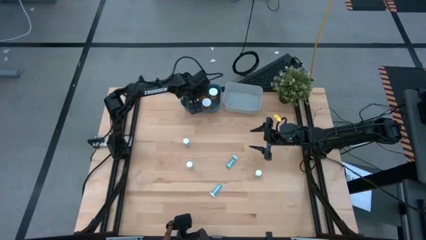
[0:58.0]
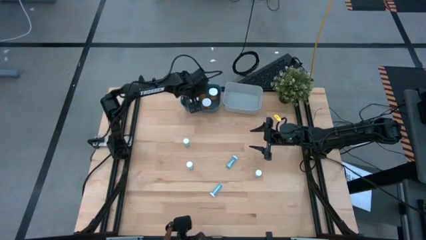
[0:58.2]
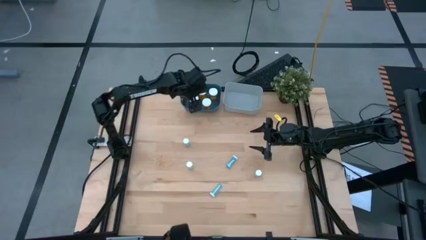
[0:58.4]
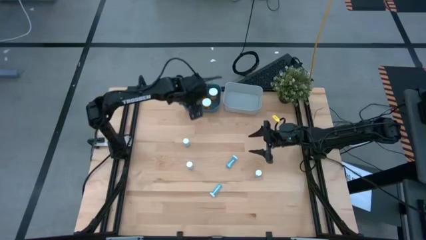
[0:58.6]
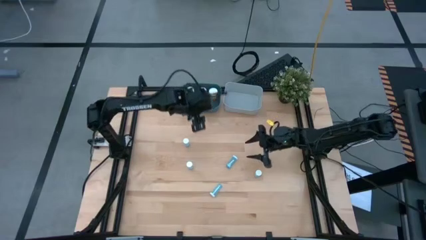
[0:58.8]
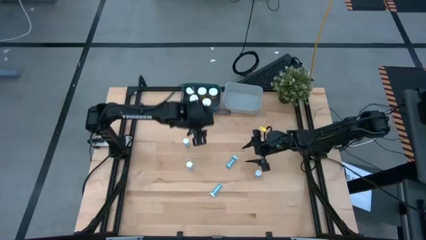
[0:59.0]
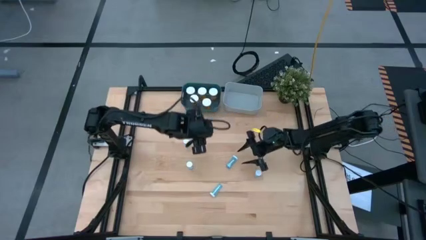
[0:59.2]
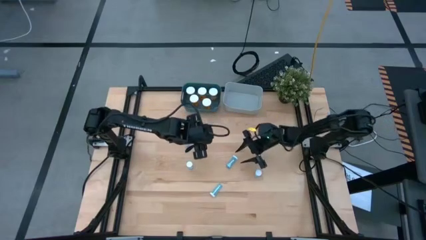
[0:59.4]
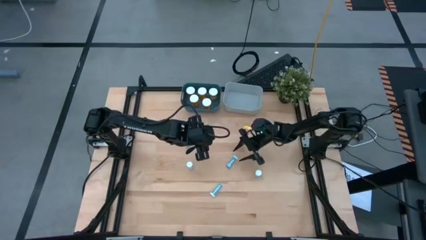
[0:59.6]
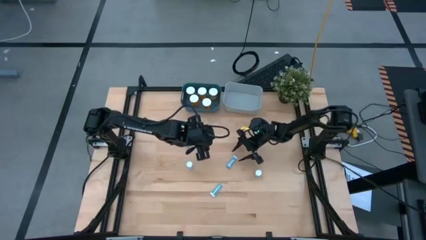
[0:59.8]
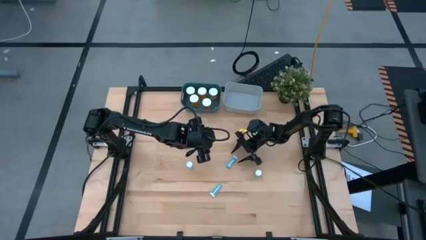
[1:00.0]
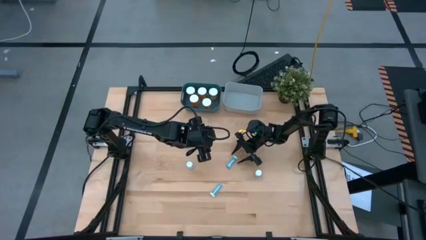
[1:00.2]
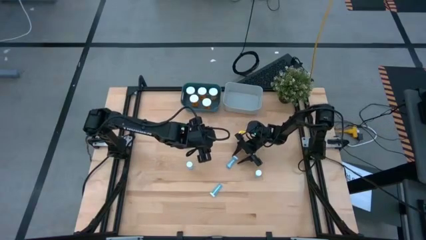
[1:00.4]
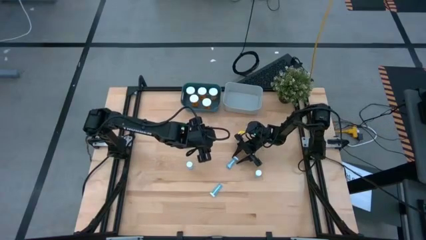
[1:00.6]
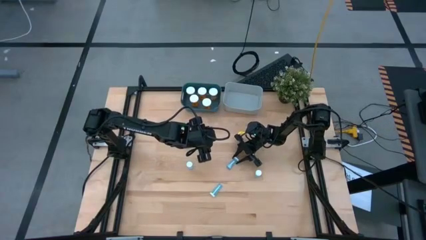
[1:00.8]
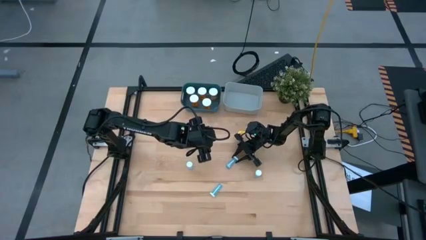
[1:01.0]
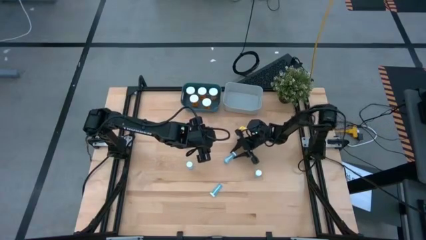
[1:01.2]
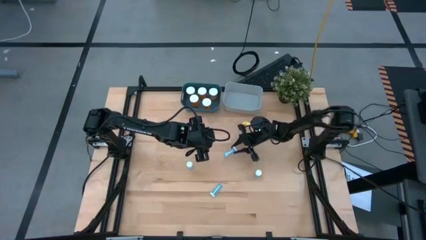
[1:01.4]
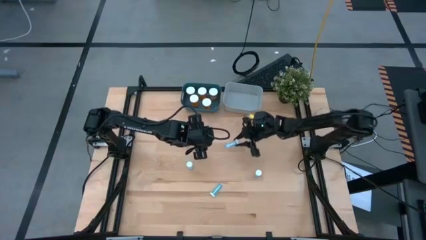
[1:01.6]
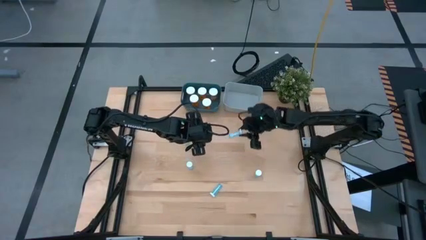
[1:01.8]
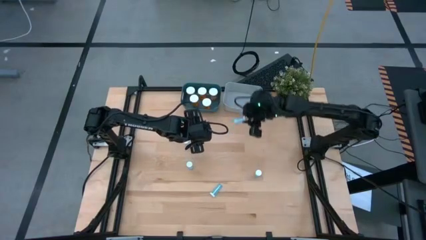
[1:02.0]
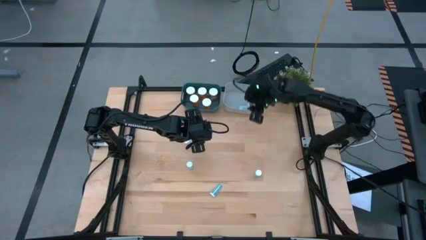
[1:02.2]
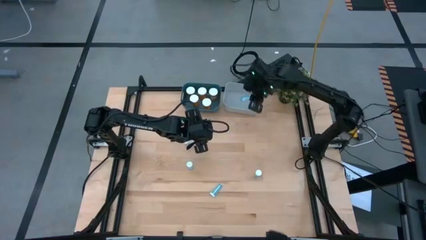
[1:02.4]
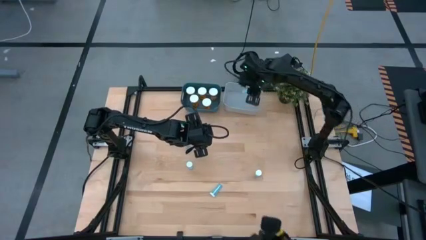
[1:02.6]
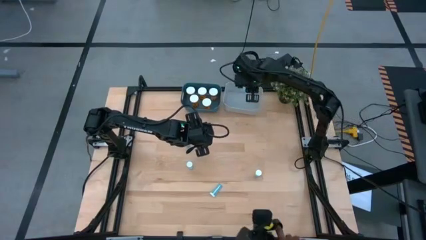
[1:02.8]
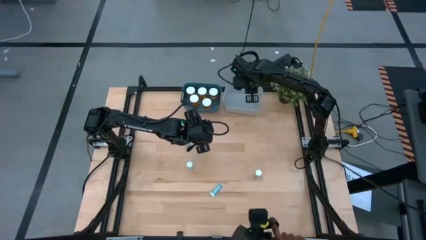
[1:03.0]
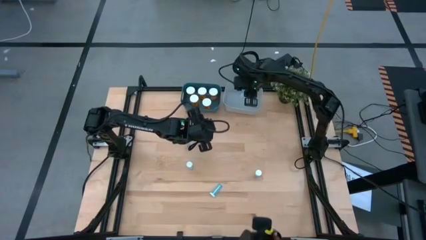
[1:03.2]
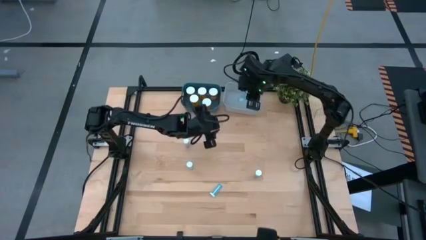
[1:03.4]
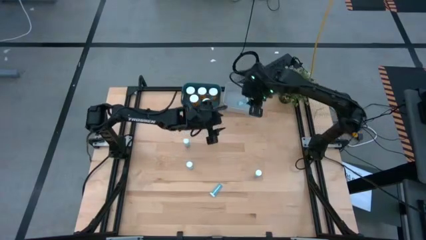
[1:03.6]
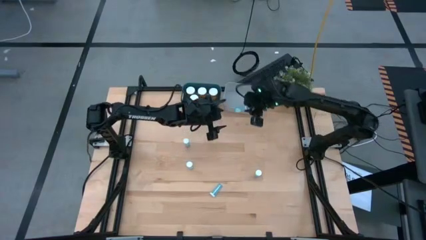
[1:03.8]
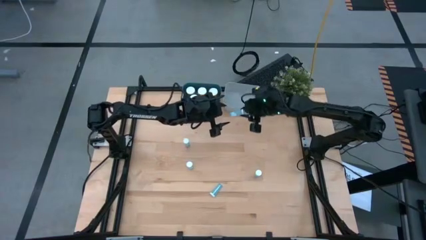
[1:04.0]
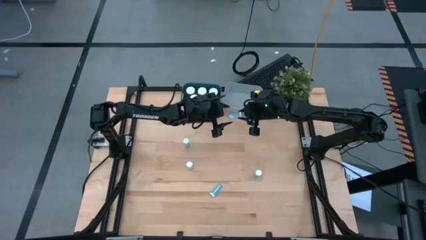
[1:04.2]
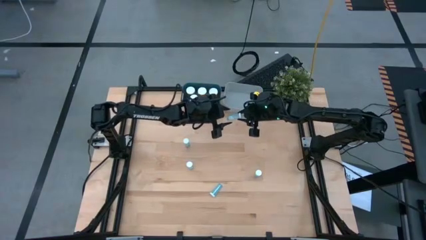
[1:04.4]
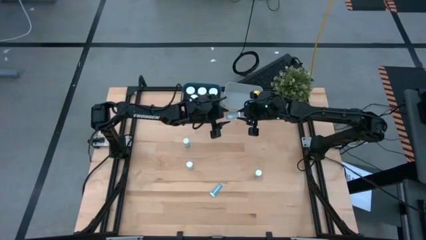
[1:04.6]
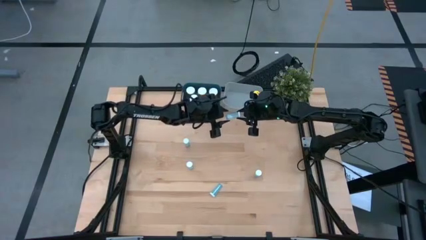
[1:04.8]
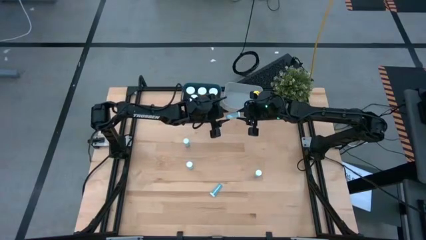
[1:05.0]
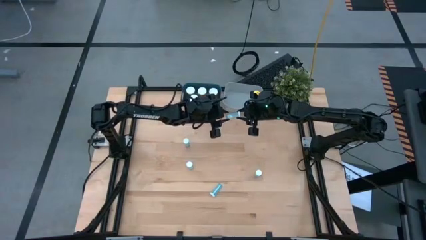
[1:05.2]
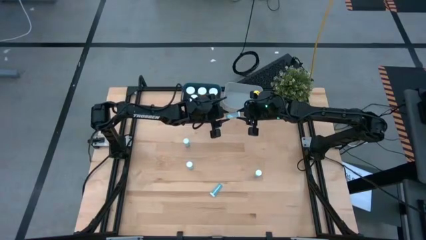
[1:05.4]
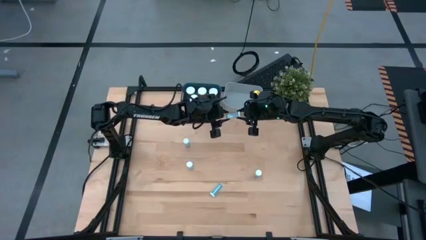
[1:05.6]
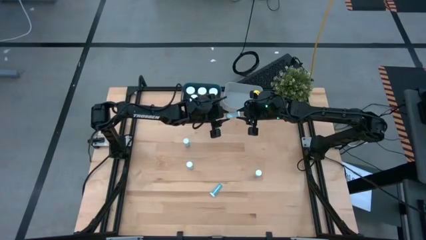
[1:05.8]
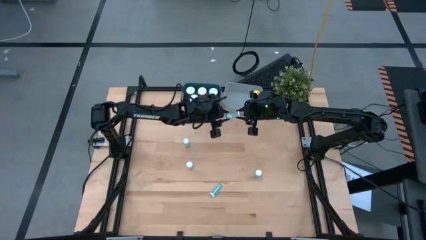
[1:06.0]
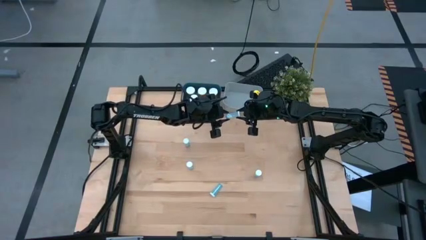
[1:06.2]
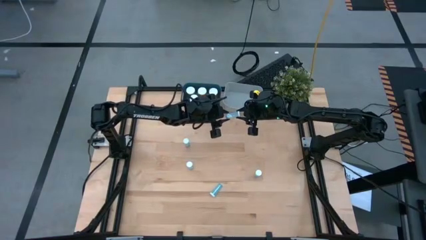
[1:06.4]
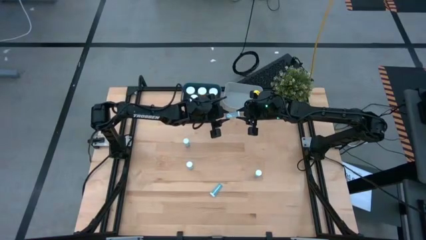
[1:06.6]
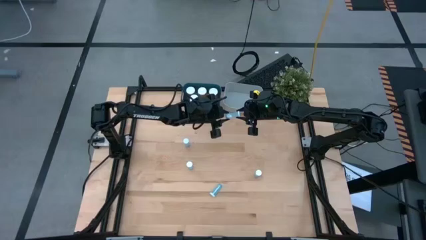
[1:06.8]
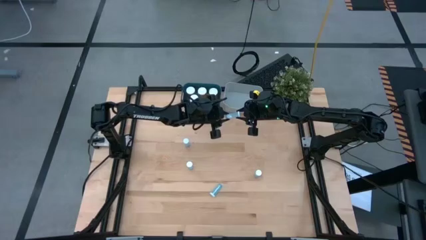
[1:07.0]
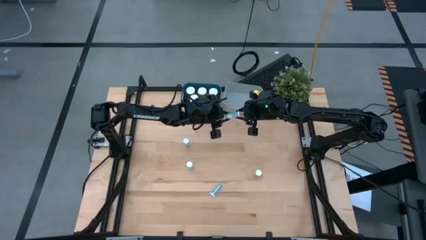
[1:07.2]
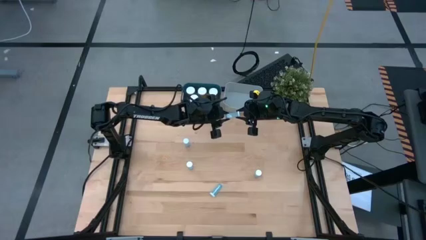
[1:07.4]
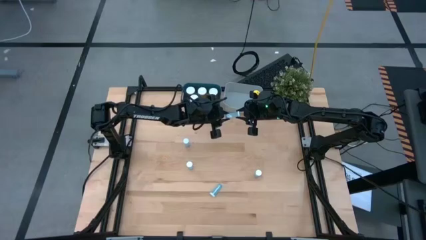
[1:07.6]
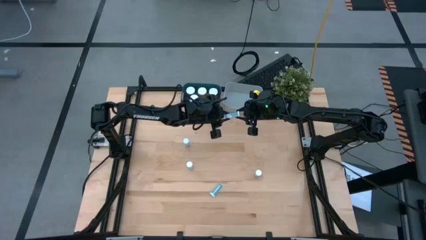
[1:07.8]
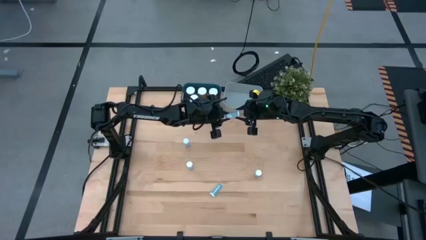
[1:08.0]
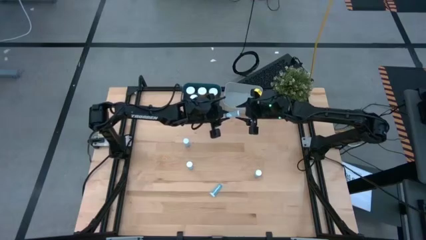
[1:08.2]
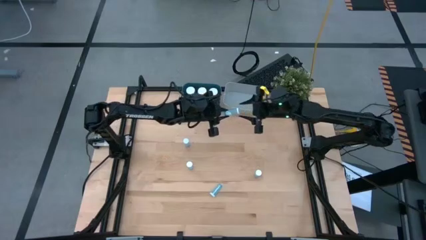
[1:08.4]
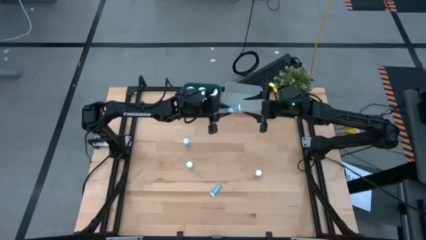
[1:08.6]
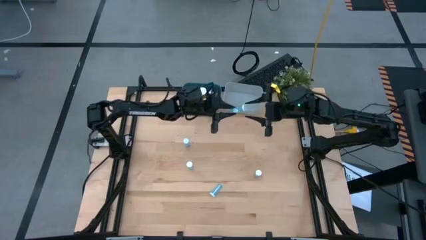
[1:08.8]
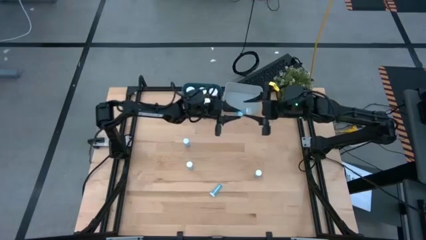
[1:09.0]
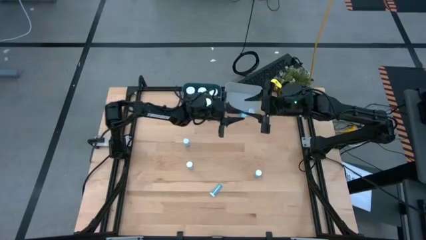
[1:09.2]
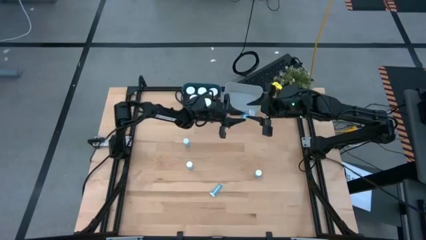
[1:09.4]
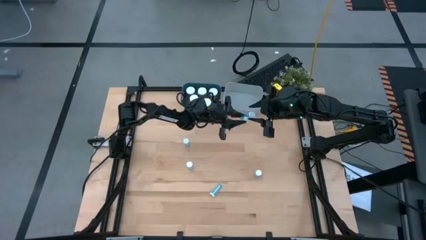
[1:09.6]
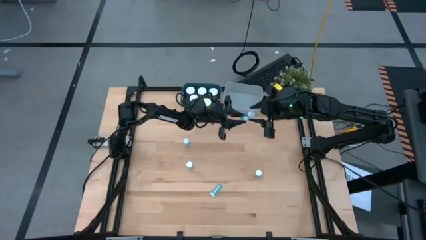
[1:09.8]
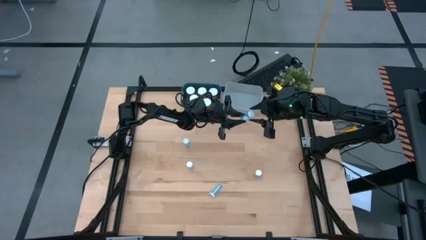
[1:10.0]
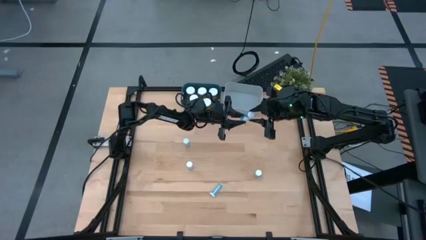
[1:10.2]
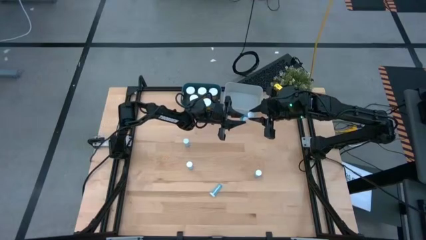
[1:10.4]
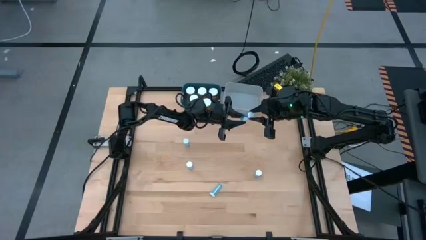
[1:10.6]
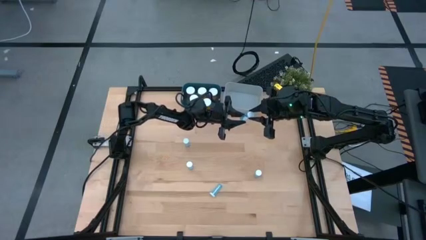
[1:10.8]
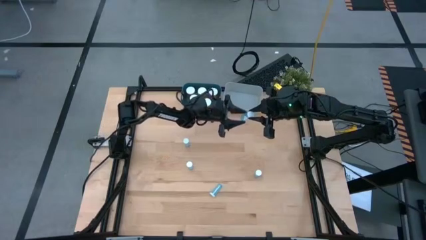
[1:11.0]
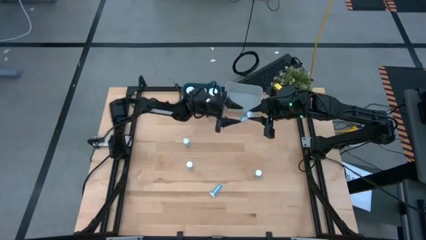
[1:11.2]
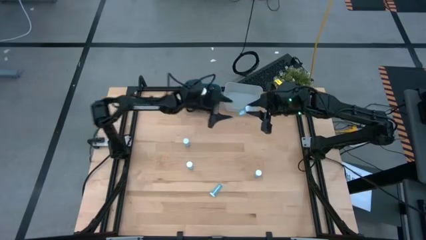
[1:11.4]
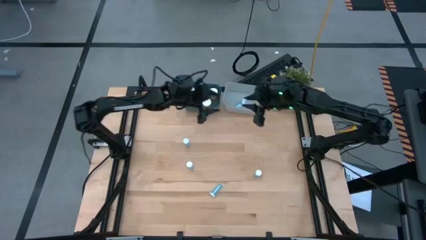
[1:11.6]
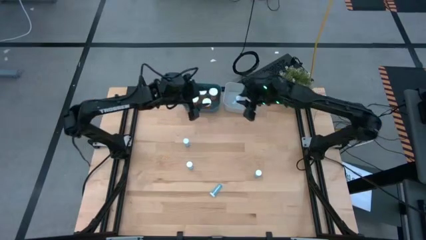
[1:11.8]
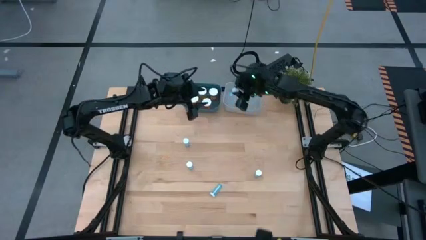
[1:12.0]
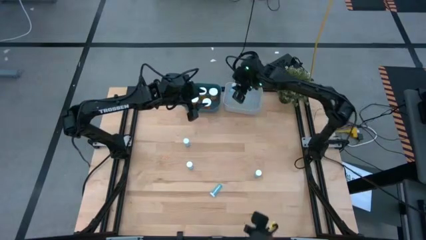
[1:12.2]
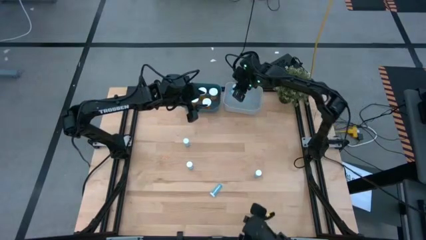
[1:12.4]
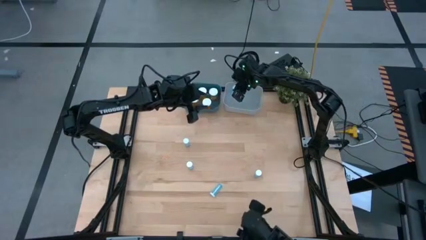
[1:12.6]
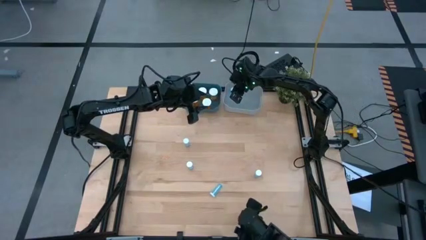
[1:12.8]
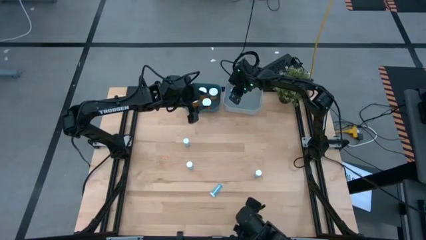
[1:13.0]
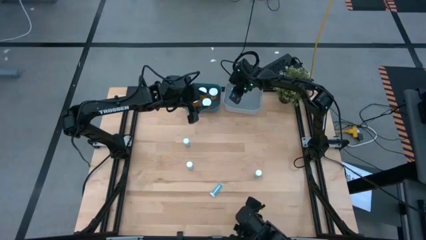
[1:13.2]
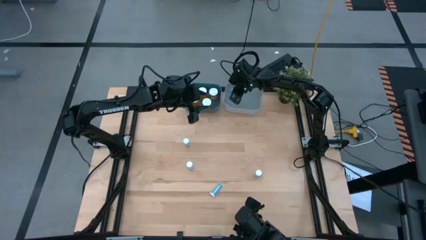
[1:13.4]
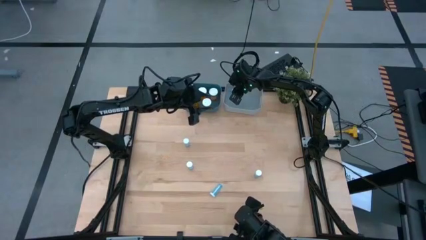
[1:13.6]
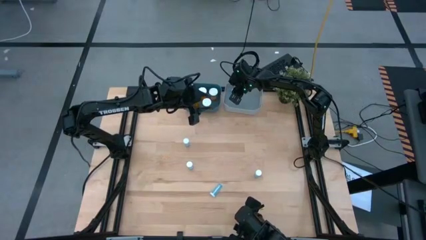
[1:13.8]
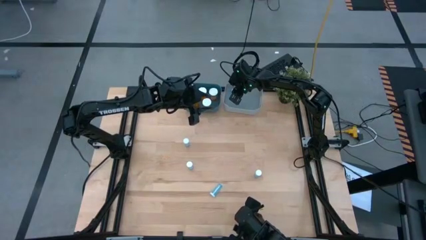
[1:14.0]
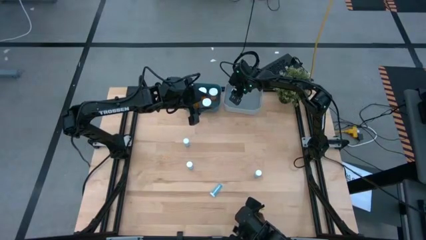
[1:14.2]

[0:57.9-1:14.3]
Task: Pick and place medicine bottles into bin by pill shape (circle, oval)
Put the blue pill bottle into the gray bin
